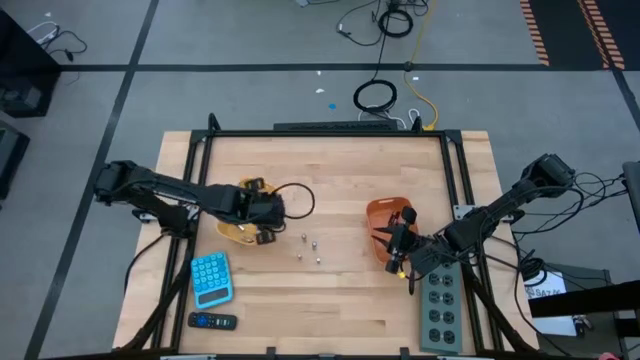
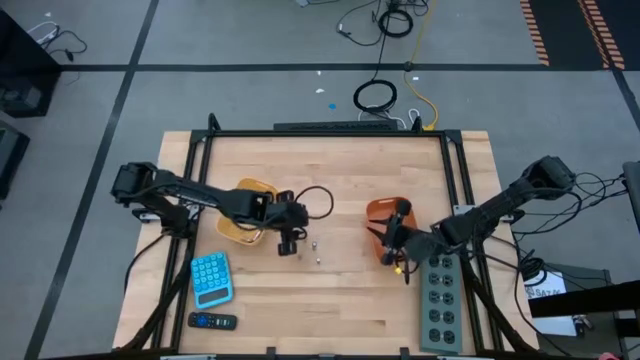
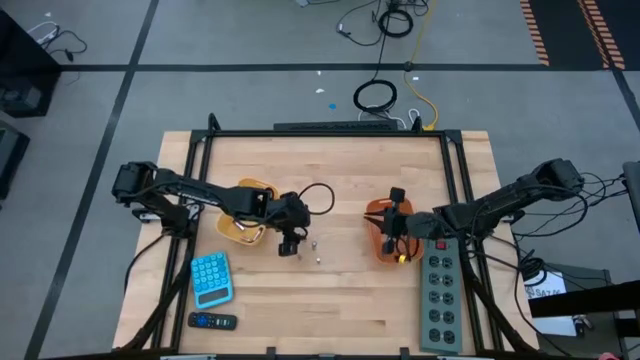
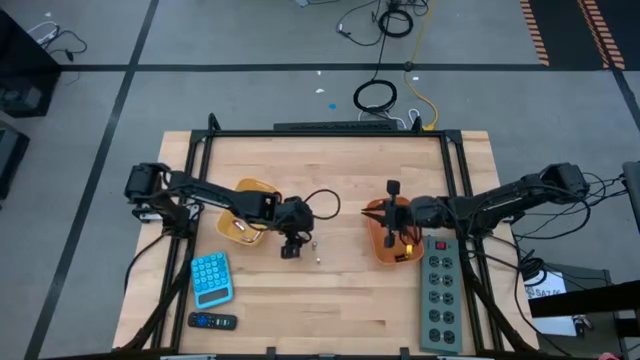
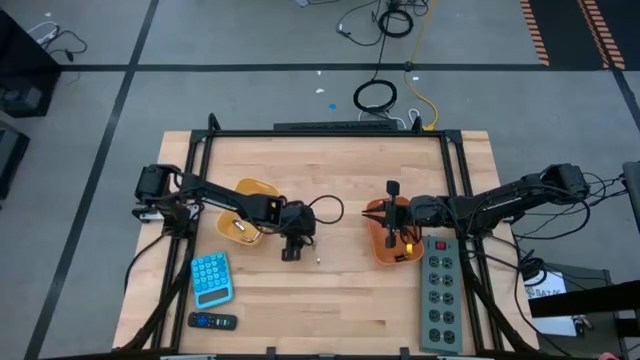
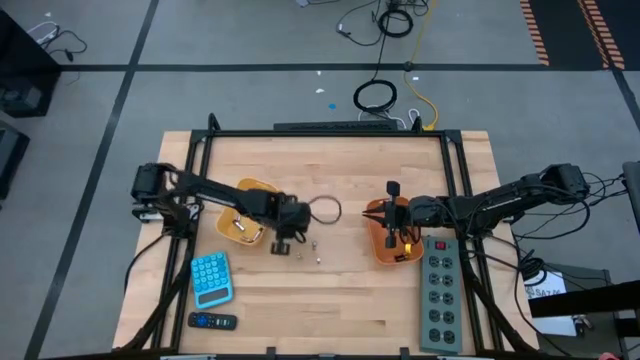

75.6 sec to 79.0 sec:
Task: Sort batteries
Put the silver battery into the yellow bin

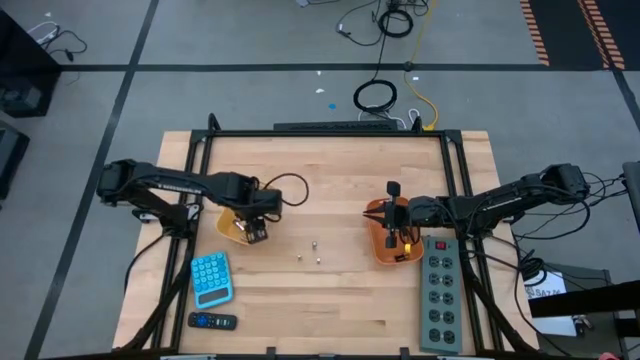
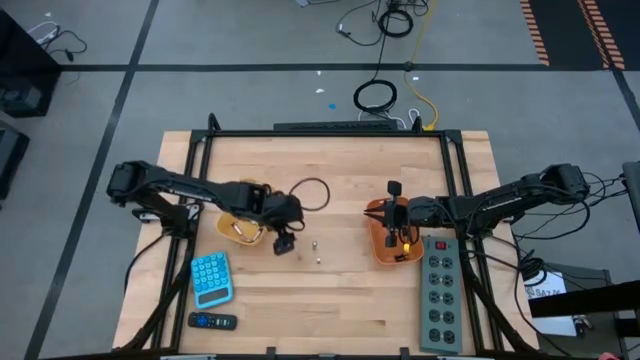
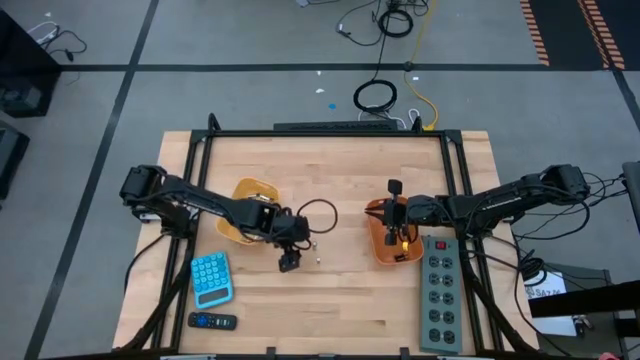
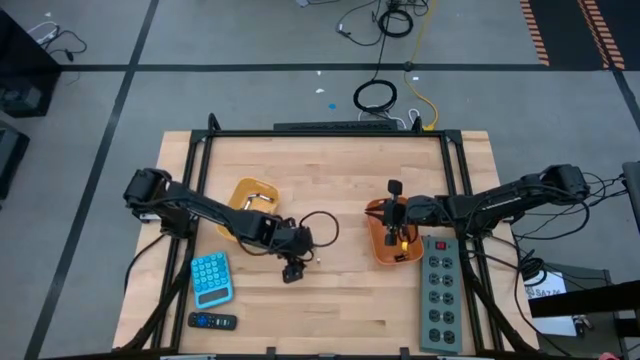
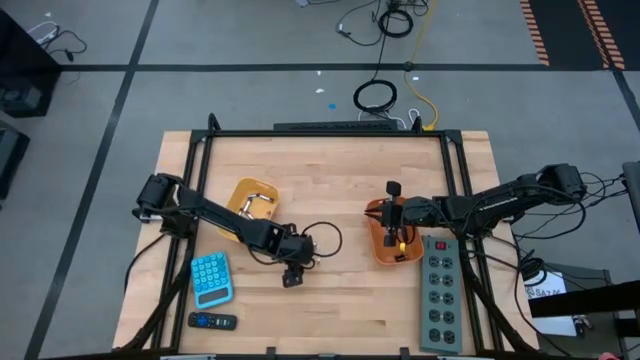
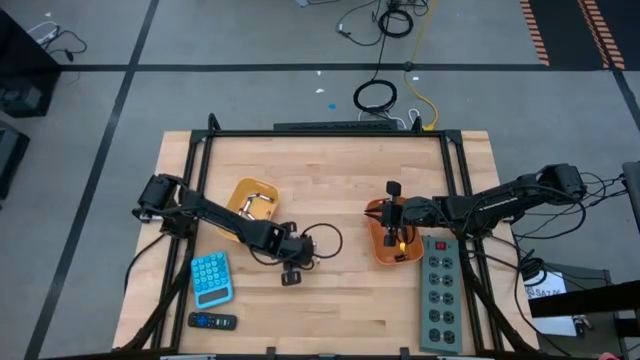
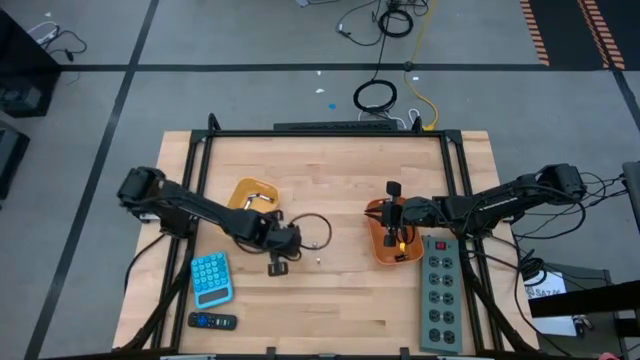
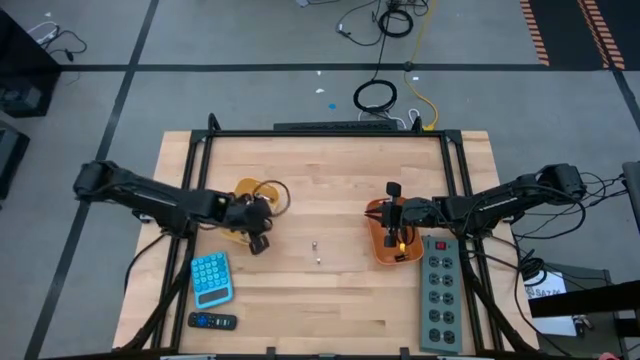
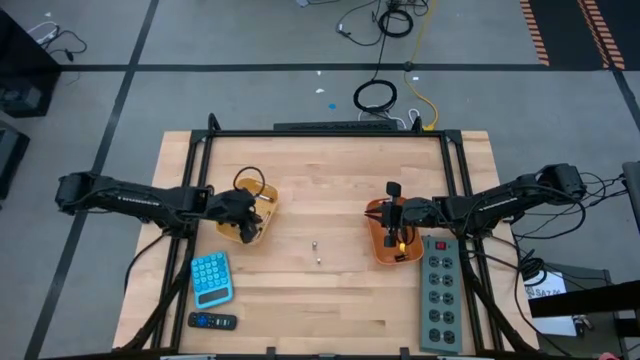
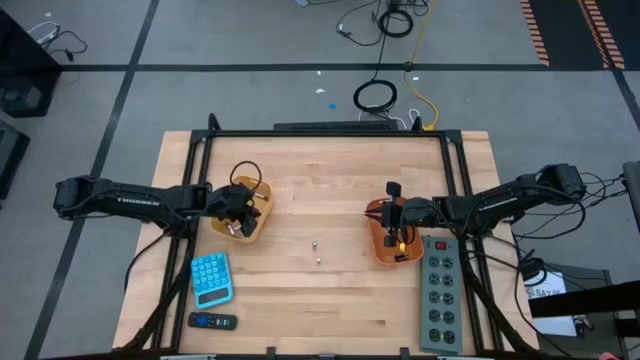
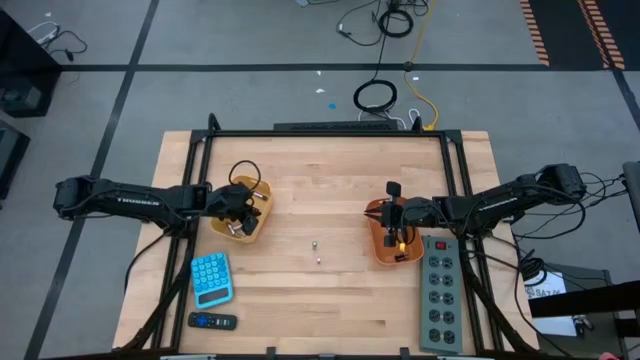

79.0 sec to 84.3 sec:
Put the silver battery into the yellow bin

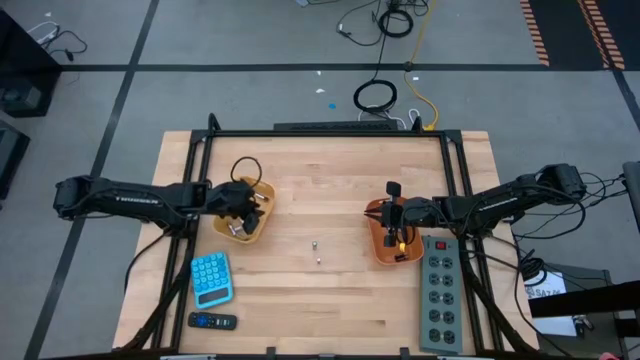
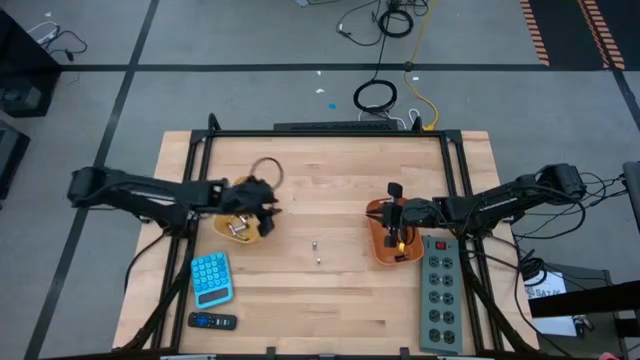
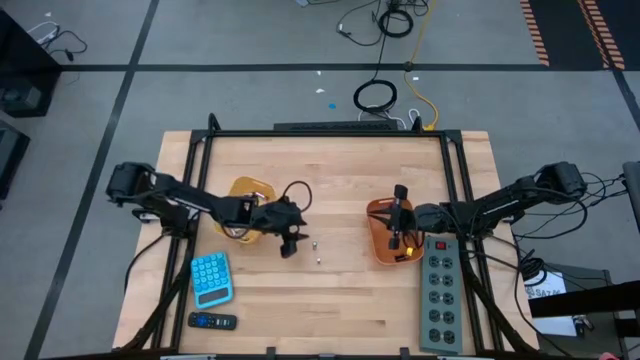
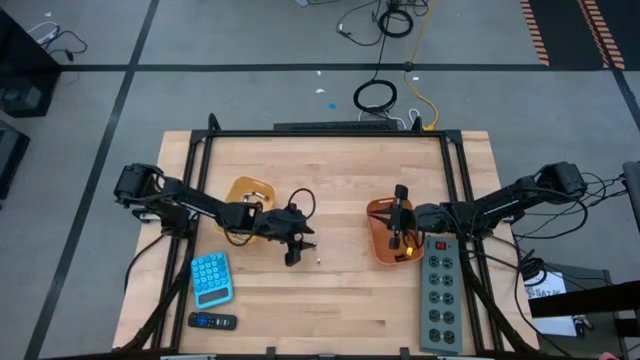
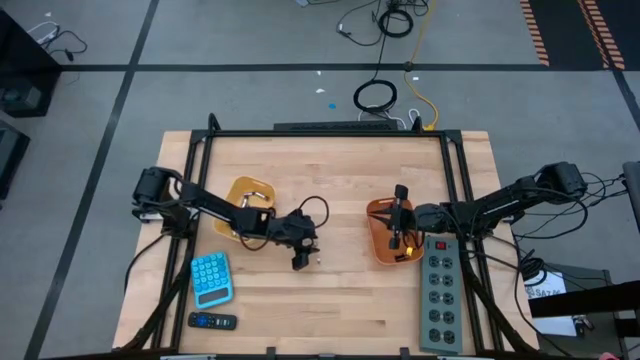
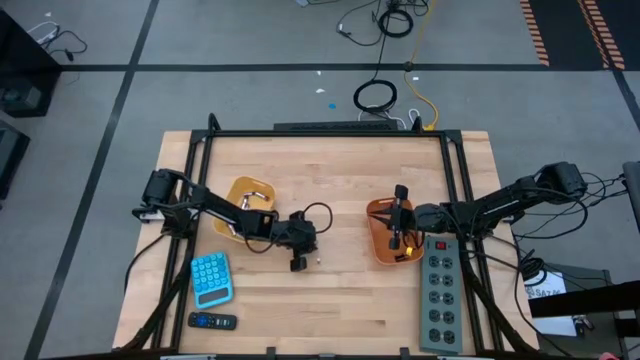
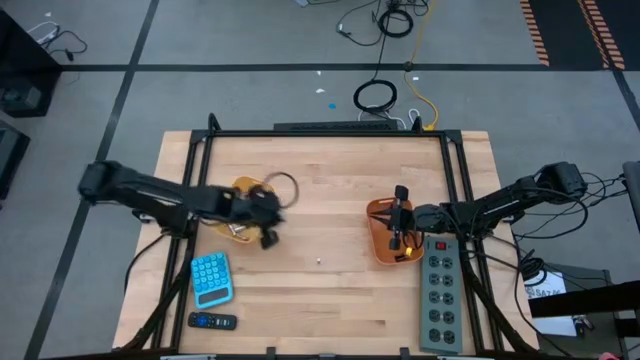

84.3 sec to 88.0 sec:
Put the silver battery into the yellow bin

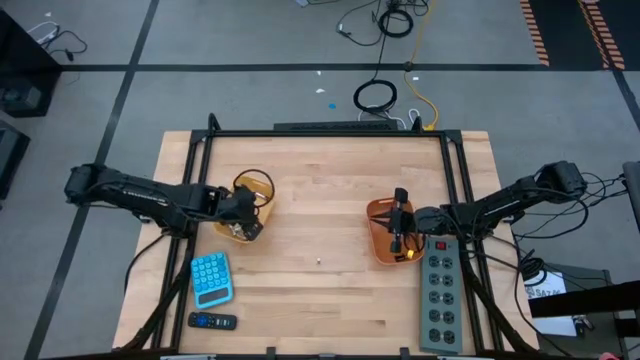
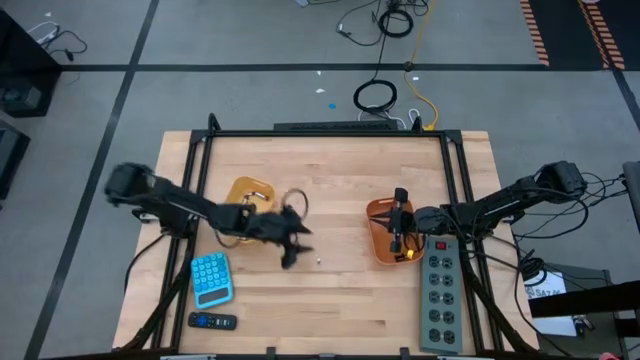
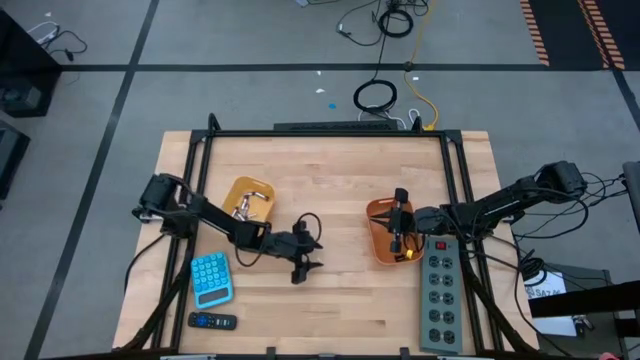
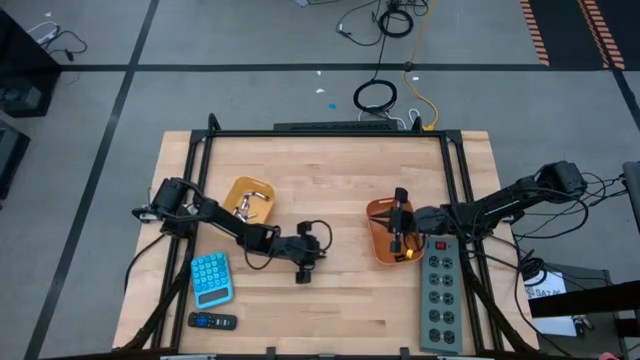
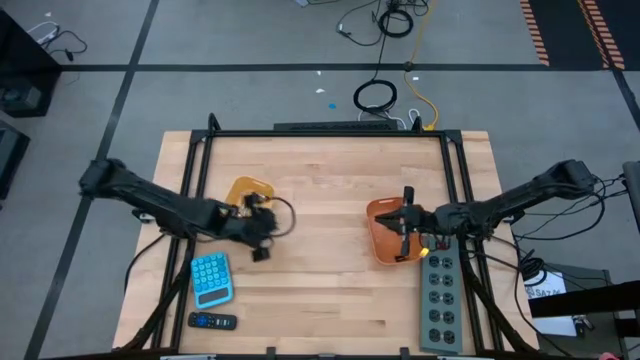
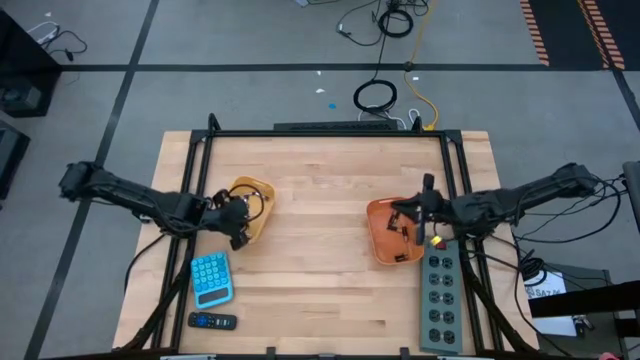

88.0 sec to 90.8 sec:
Put the silver battery into the yellow bin

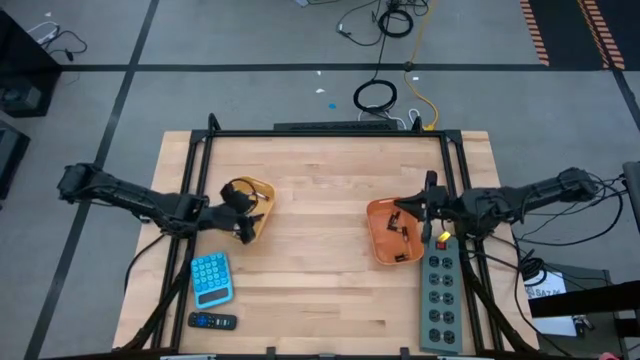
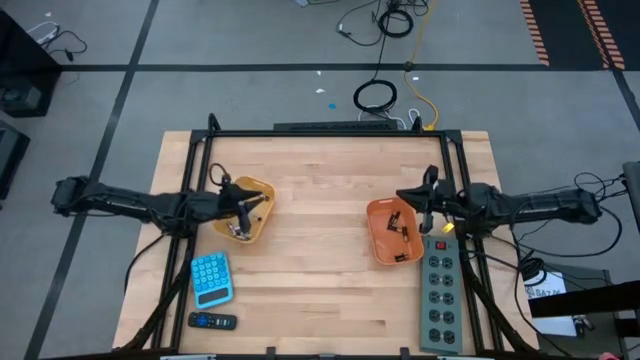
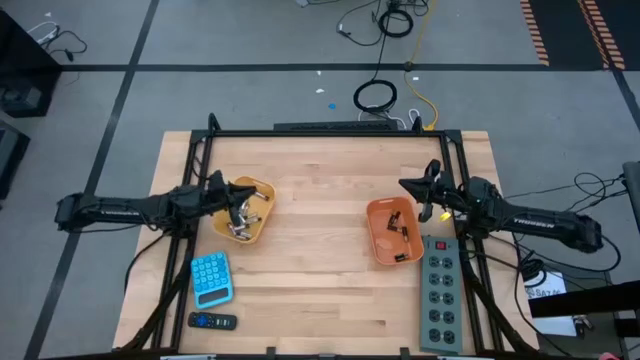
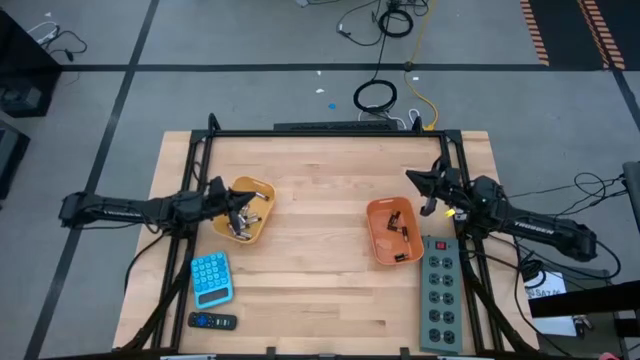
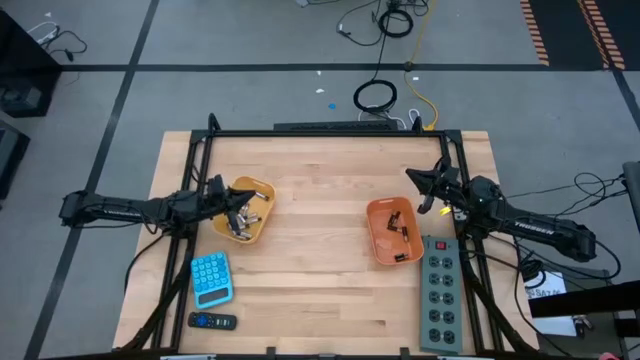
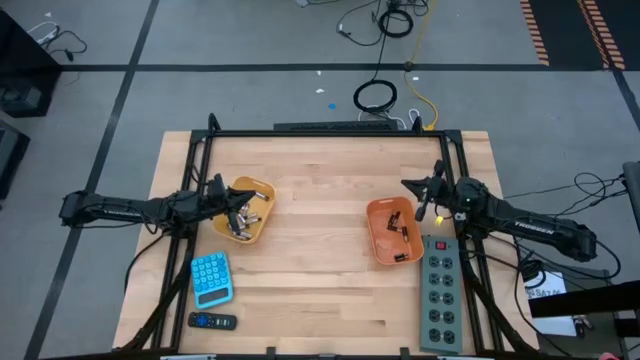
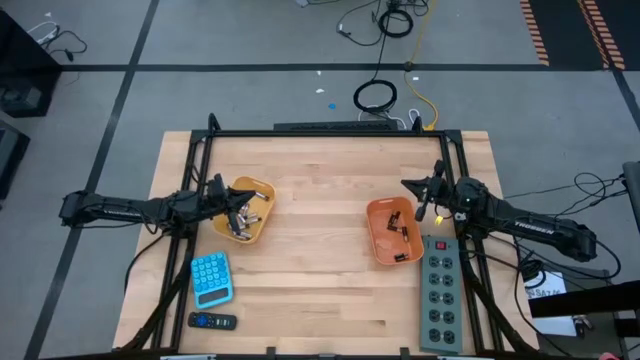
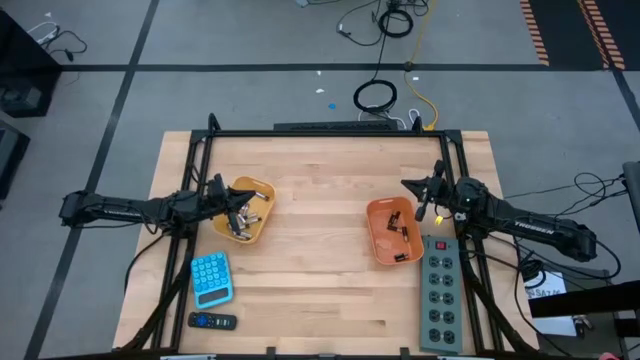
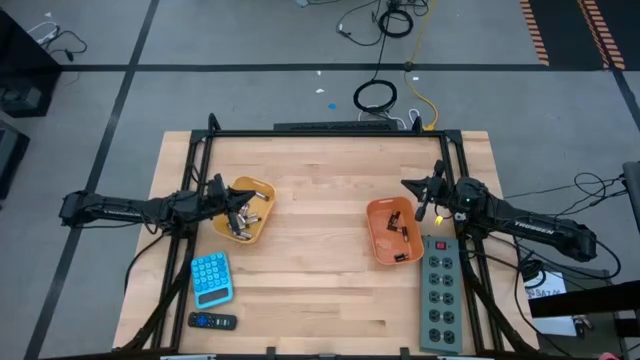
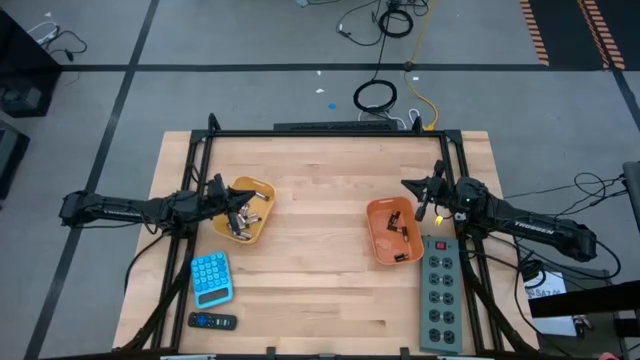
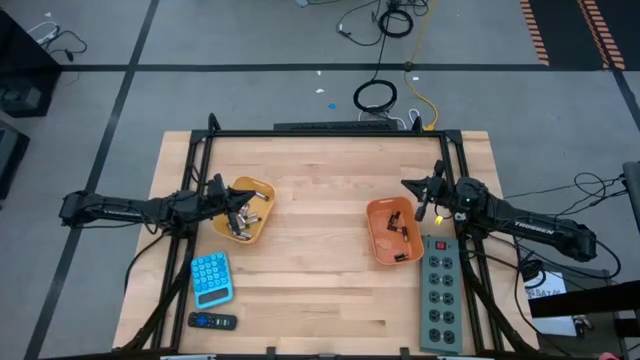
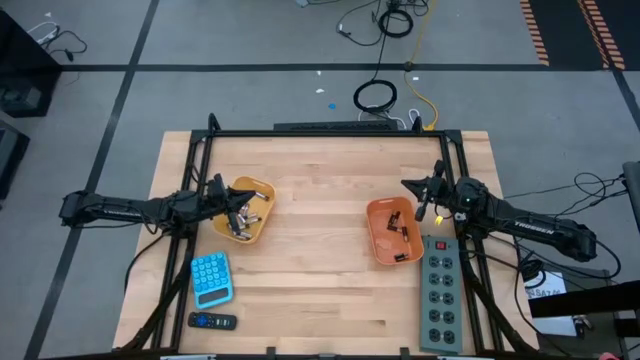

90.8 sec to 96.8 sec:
Return to Home Position
